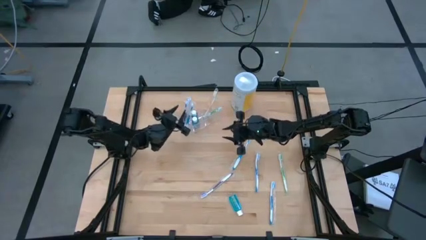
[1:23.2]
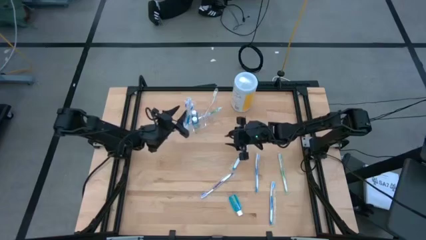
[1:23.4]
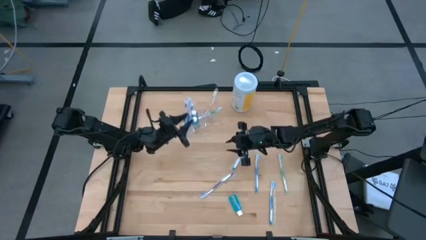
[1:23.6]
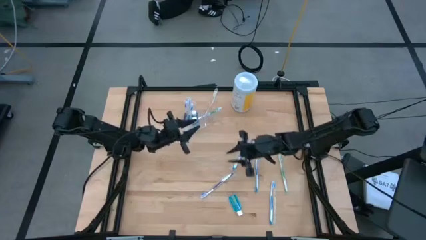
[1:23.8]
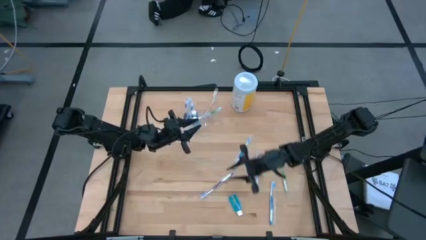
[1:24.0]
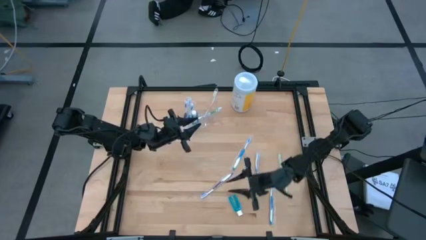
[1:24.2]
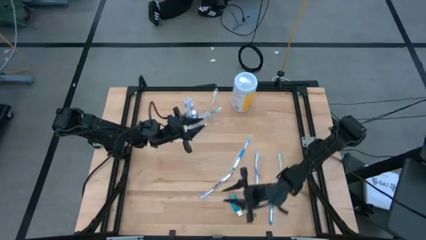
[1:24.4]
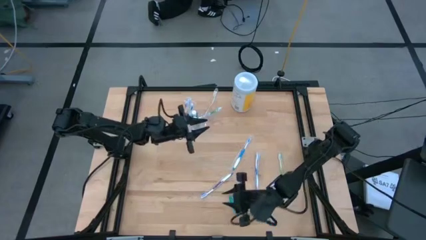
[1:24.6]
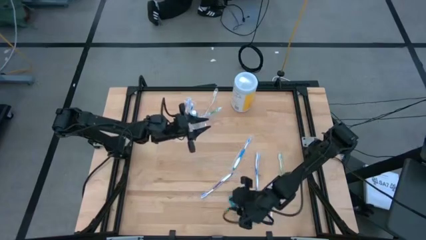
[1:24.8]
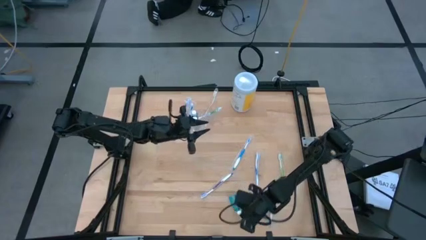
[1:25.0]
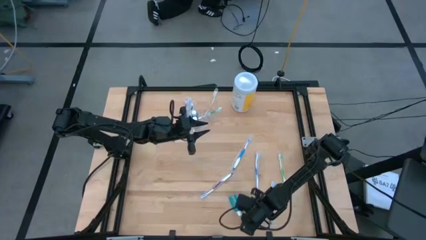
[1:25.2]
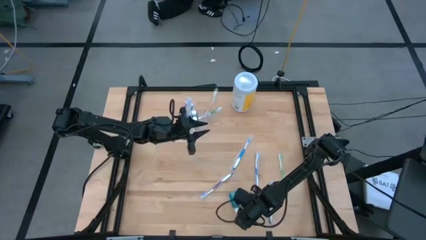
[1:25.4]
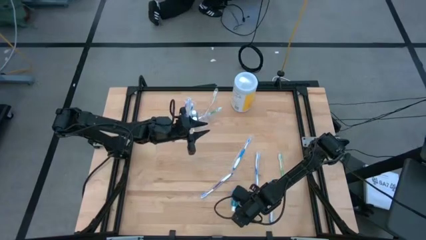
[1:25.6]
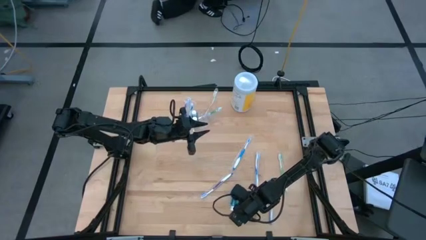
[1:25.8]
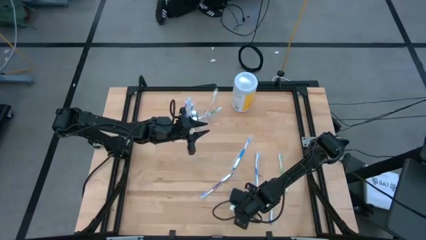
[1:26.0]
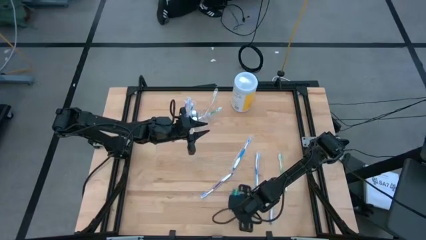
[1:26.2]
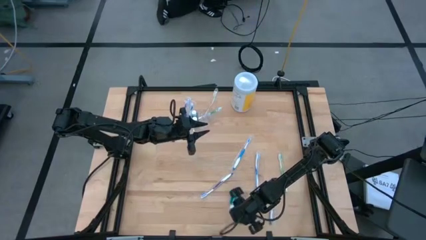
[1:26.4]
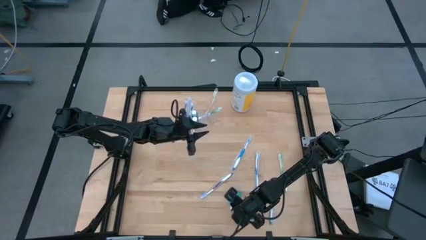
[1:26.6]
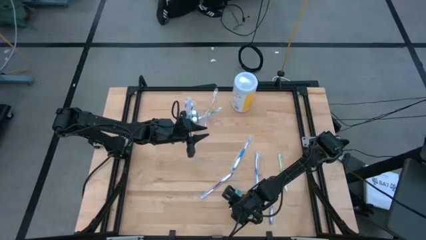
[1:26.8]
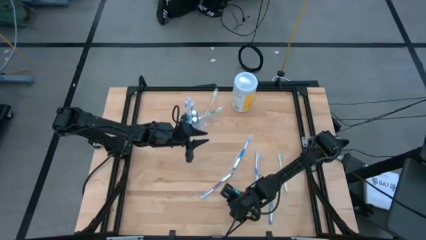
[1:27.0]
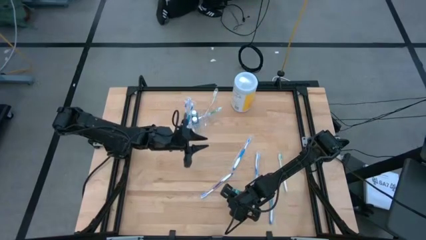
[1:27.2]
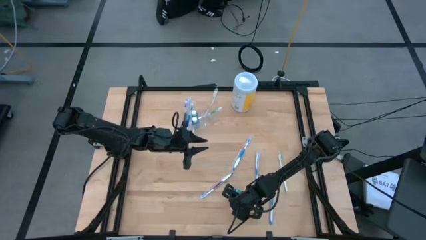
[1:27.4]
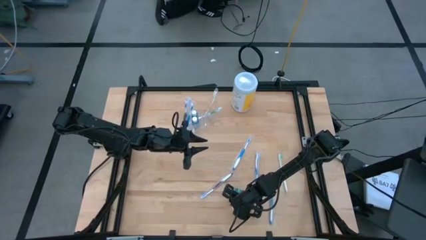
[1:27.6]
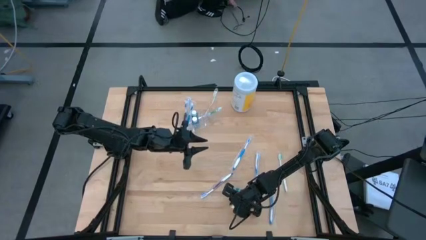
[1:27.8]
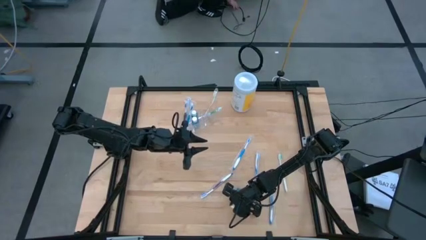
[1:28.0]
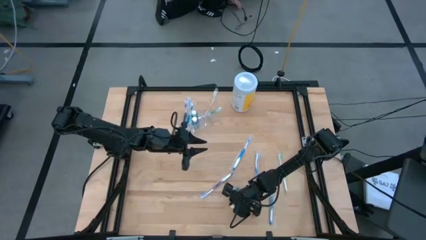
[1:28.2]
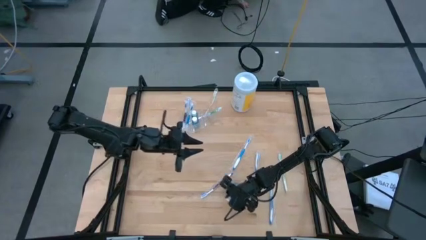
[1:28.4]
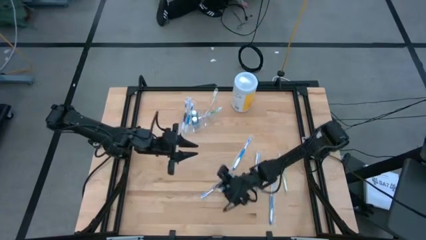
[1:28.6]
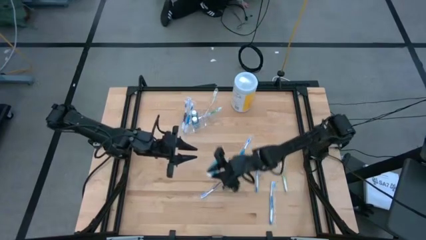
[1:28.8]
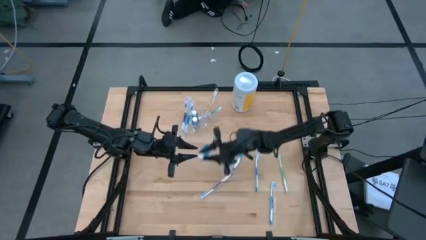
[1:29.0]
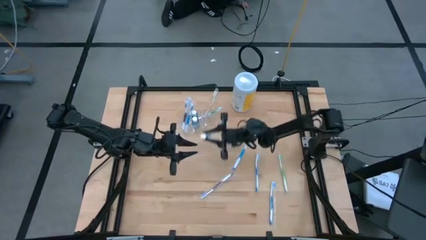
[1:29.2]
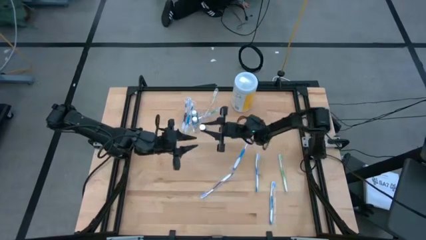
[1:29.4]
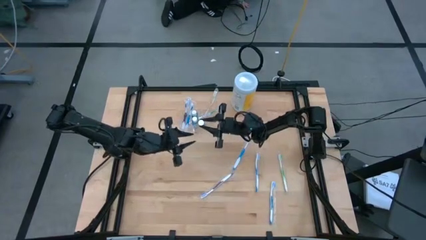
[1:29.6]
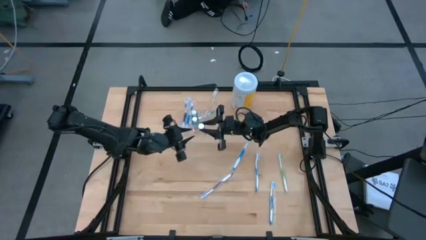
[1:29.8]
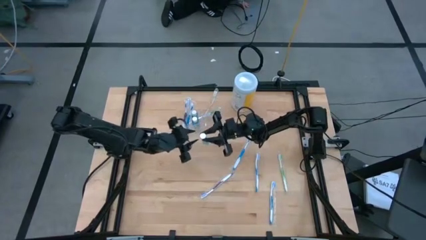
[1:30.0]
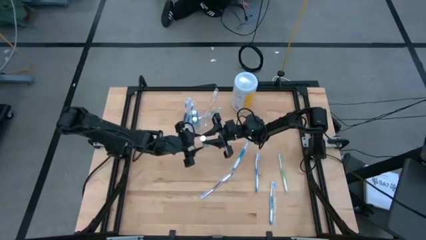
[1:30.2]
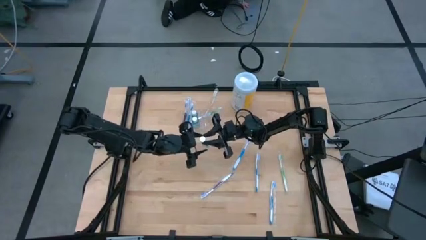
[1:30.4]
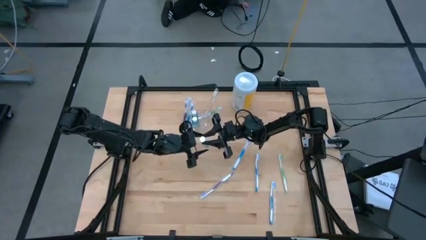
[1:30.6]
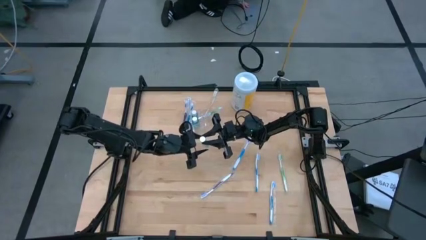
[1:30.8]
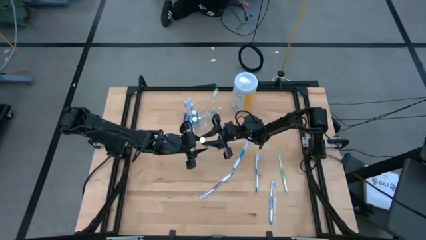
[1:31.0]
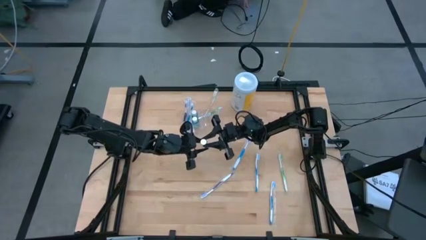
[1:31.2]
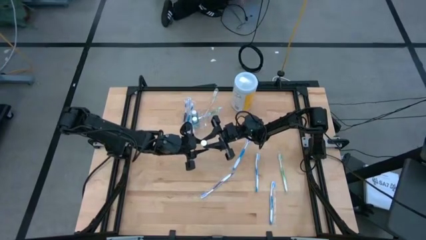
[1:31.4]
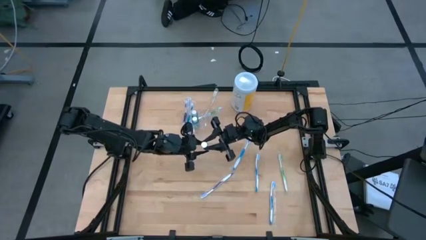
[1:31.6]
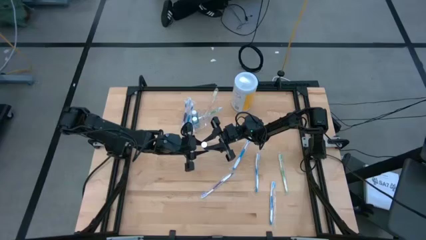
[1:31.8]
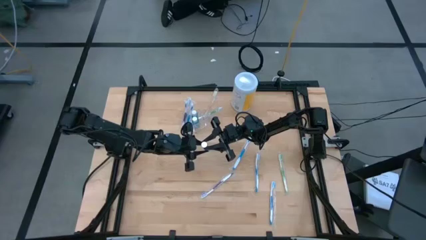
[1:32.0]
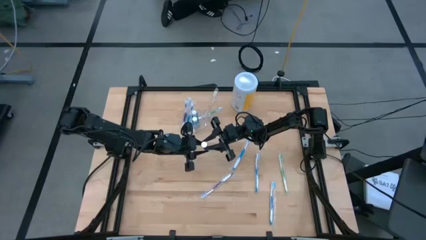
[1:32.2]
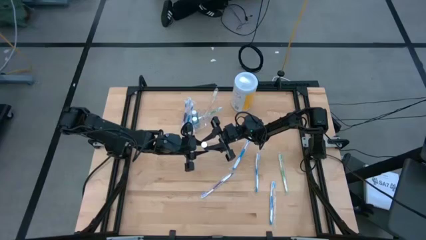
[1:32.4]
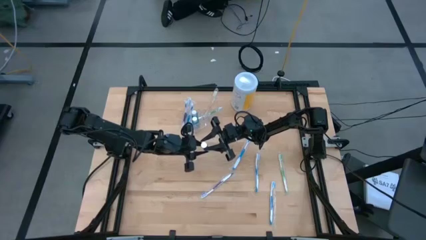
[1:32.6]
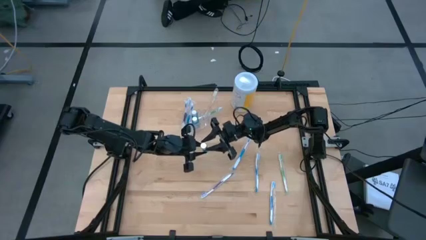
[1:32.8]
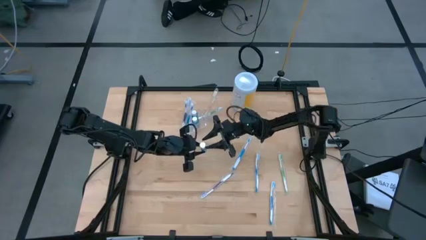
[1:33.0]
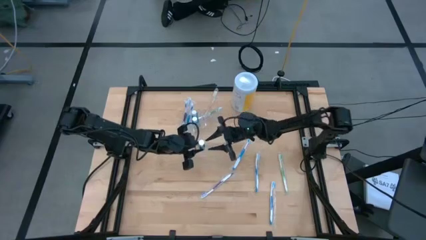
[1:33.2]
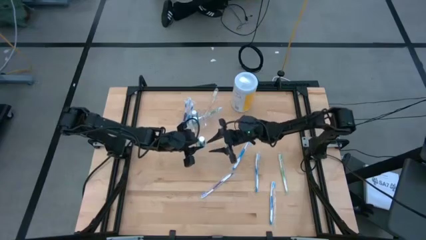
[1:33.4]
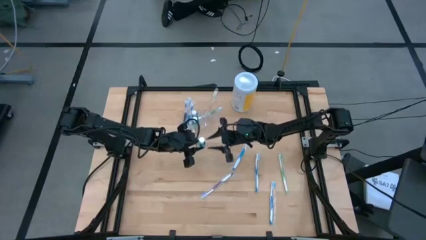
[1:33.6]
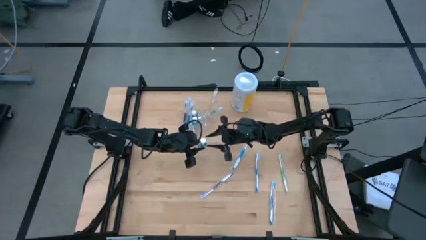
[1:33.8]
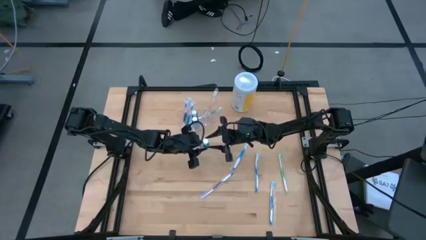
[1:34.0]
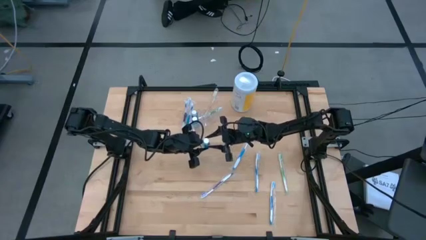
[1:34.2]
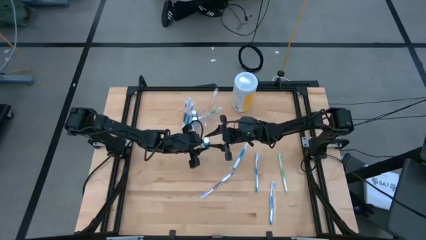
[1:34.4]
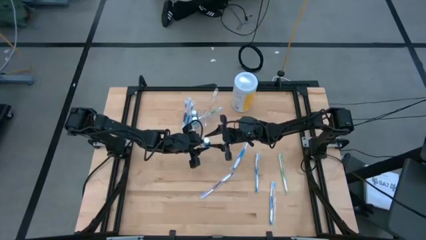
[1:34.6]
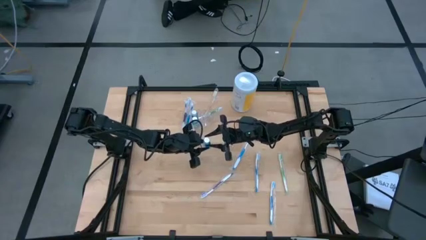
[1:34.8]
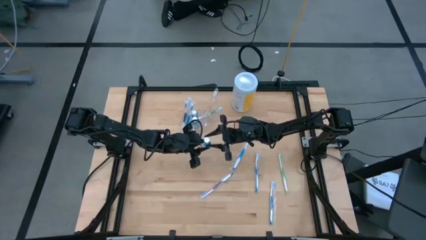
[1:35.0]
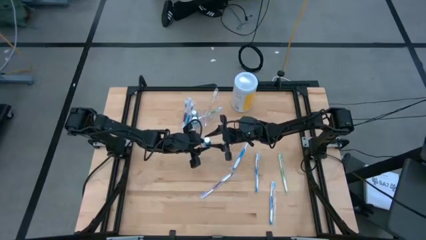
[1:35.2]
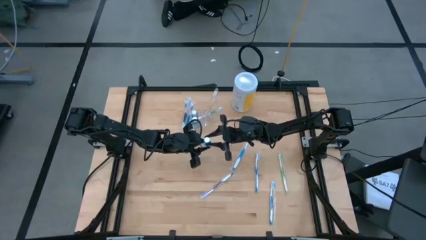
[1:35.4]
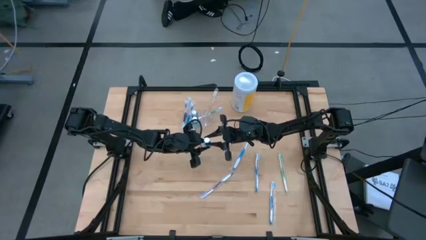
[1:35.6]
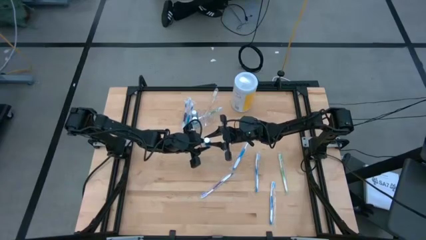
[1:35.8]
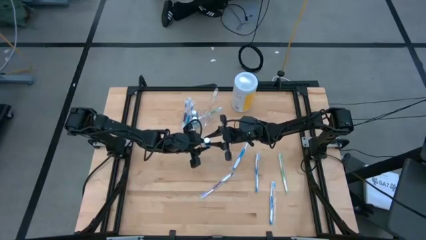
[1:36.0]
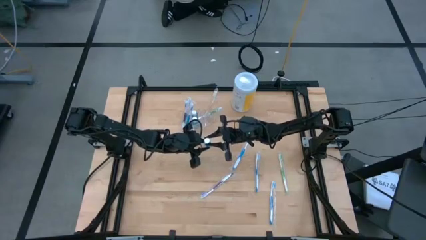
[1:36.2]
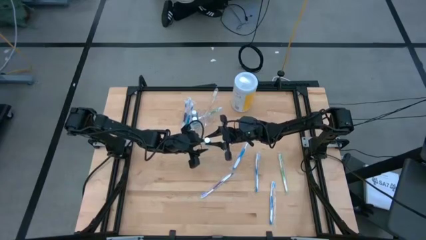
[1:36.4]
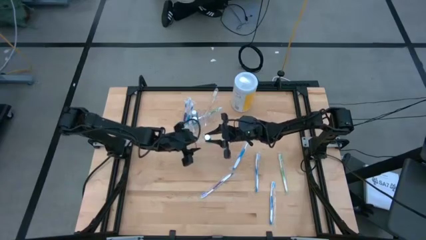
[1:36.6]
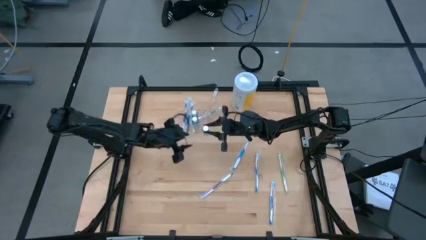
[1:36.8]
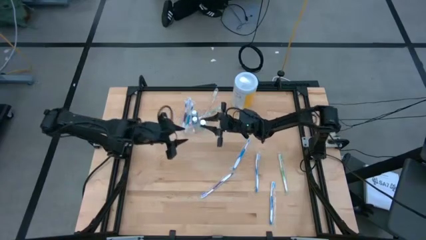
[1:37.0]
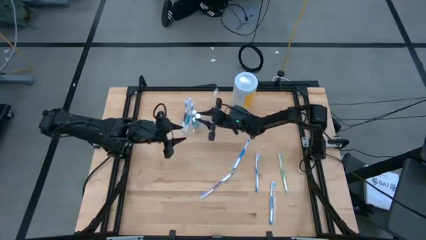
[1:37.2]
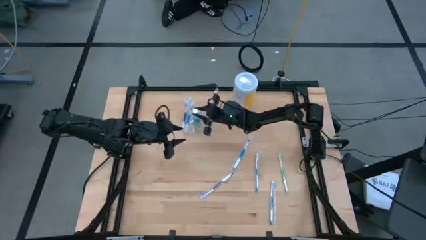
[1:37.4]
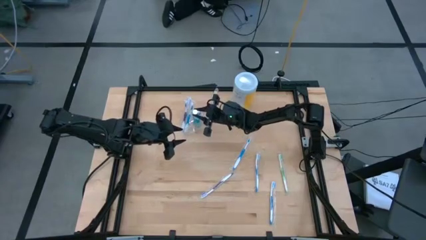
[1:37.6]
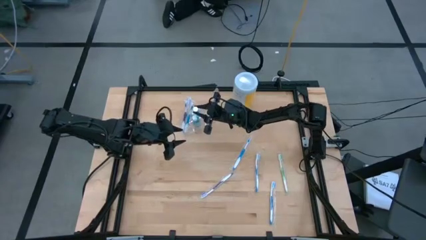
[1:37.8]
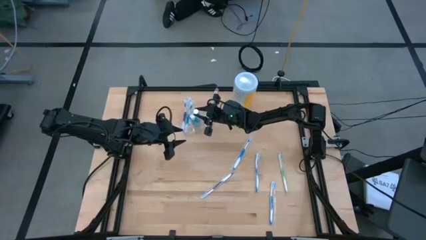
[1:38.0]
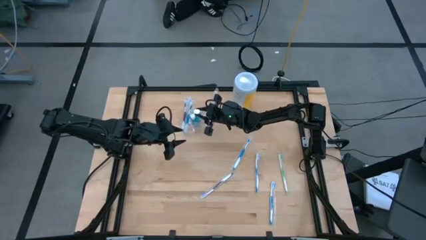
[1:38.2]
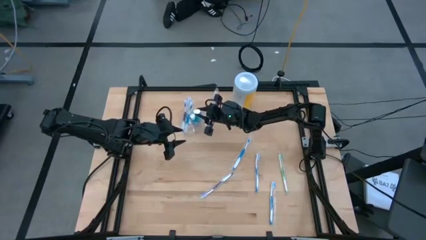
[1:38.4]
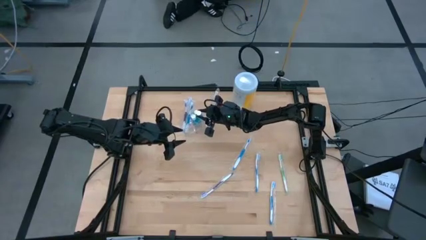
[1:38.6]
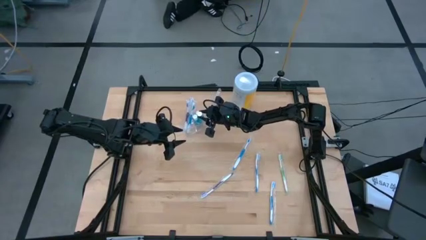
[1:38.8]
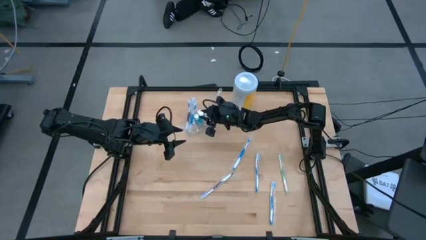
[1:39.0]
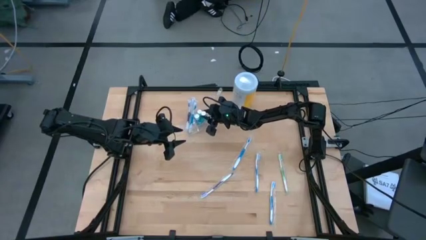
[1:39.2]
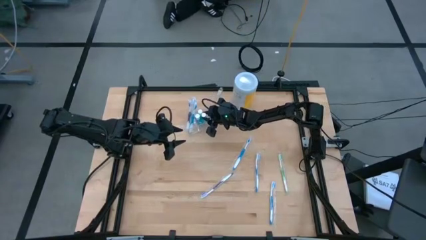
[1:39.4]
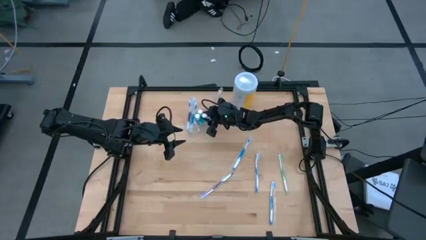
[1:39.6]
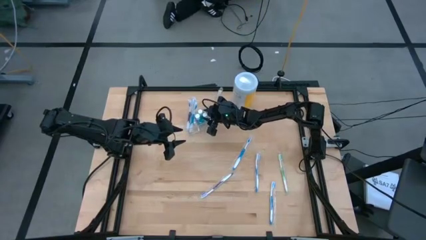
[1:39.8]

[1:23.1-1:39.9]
Task: Pick & Place toothbrushing station
Put the blue mouthwash into the transparent organizer
